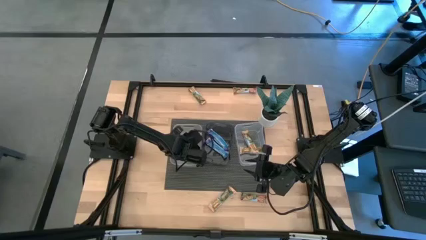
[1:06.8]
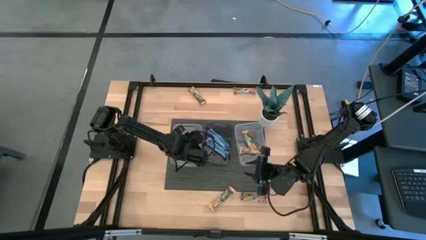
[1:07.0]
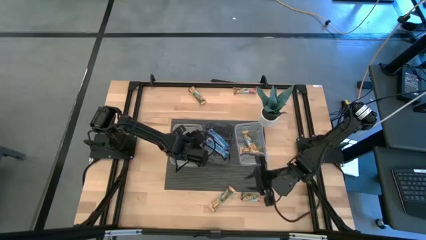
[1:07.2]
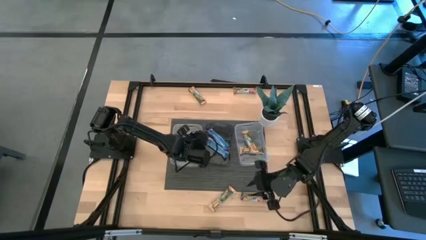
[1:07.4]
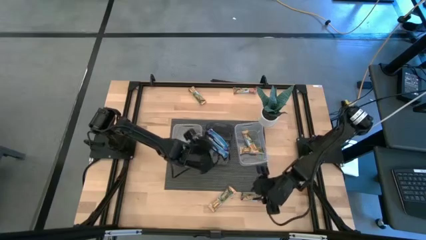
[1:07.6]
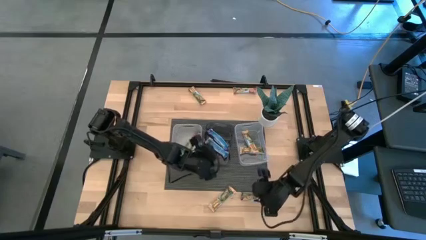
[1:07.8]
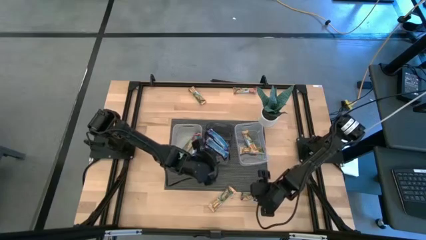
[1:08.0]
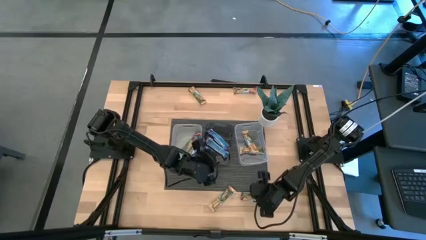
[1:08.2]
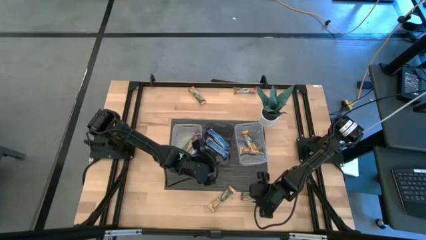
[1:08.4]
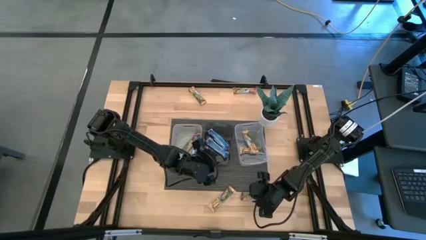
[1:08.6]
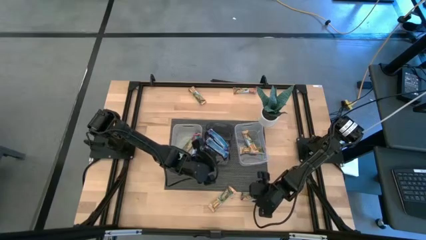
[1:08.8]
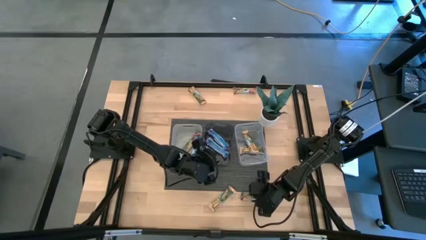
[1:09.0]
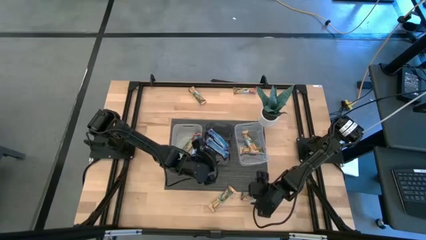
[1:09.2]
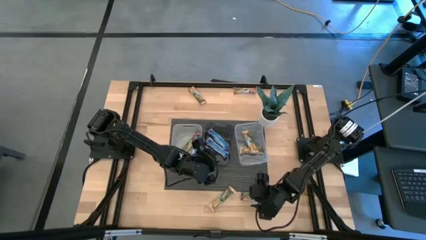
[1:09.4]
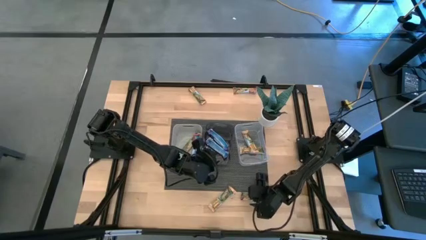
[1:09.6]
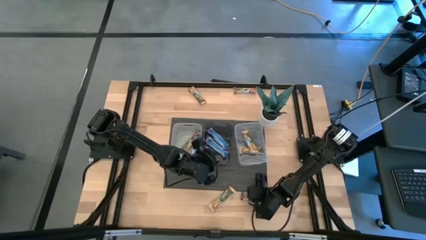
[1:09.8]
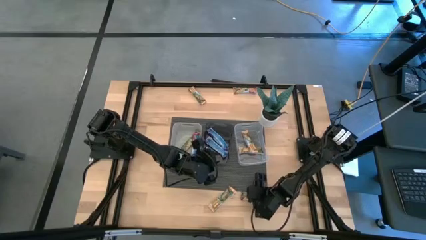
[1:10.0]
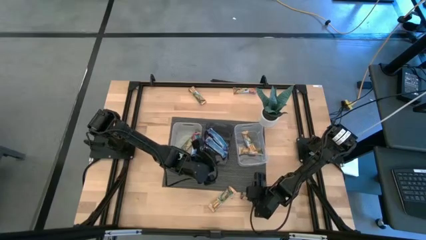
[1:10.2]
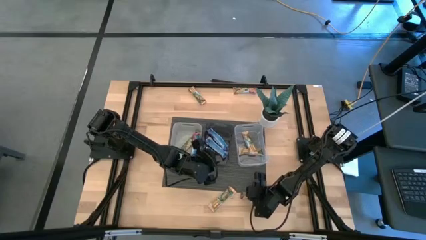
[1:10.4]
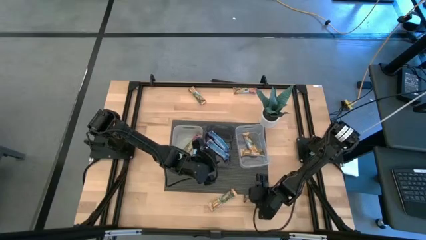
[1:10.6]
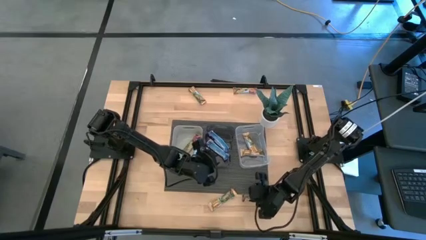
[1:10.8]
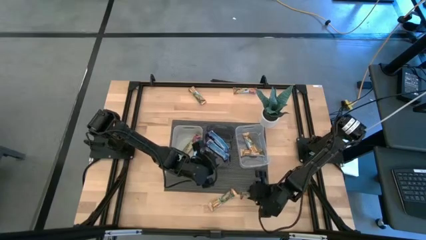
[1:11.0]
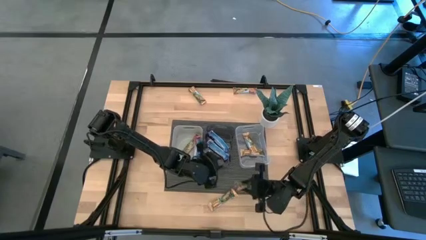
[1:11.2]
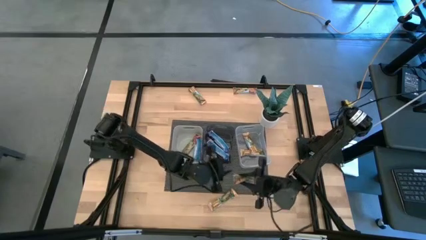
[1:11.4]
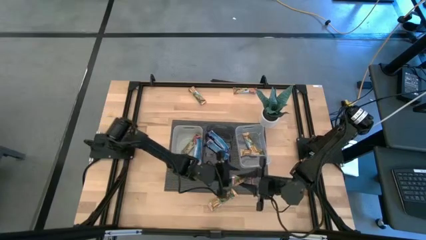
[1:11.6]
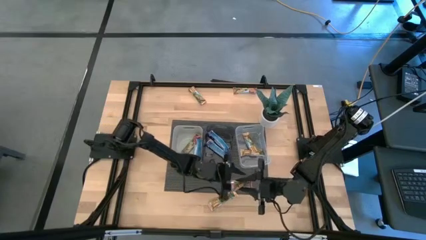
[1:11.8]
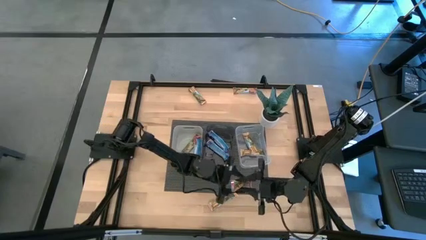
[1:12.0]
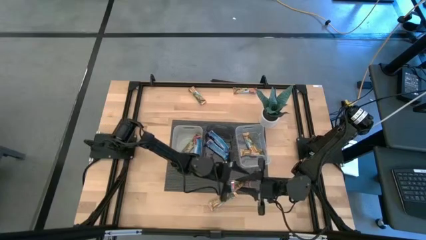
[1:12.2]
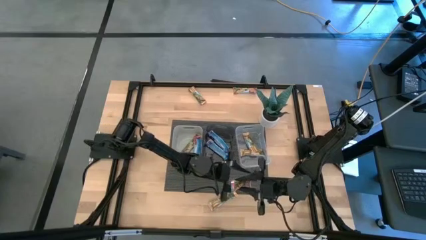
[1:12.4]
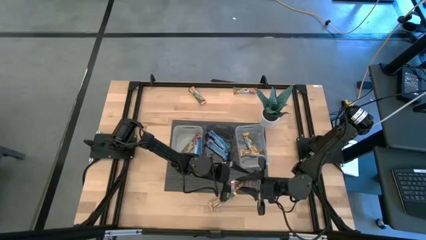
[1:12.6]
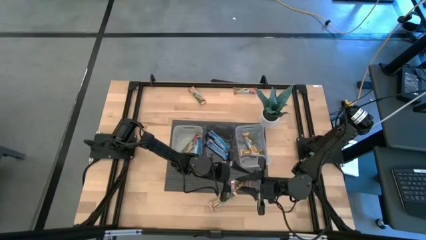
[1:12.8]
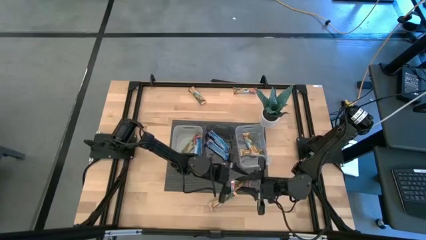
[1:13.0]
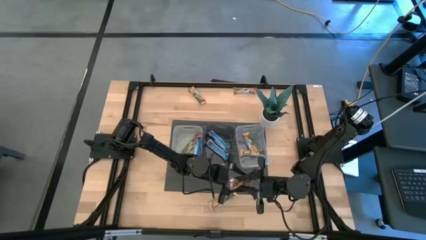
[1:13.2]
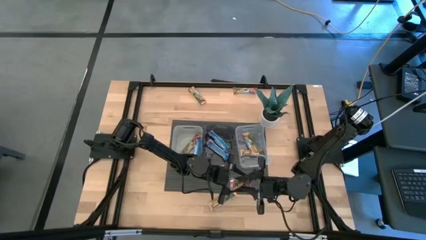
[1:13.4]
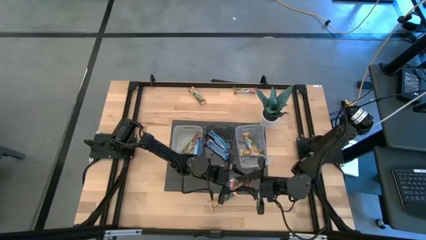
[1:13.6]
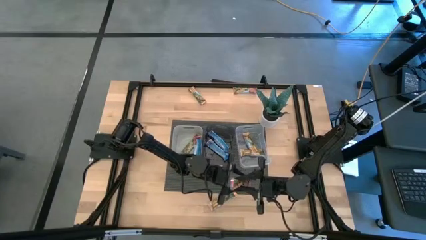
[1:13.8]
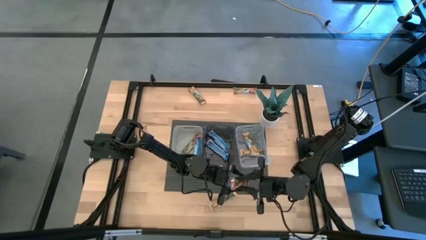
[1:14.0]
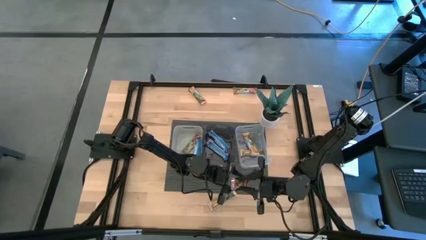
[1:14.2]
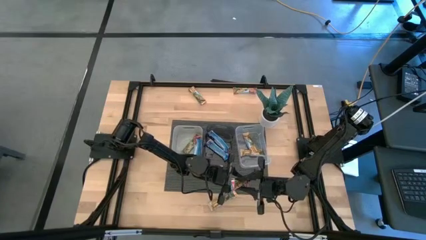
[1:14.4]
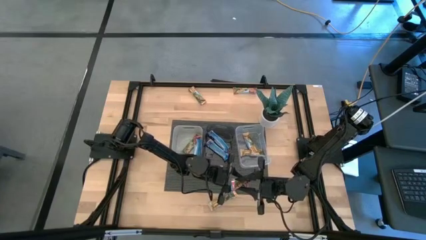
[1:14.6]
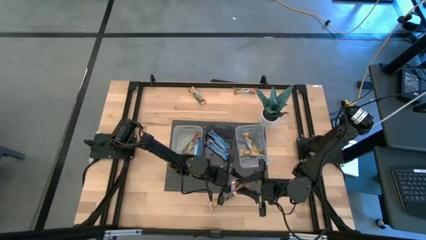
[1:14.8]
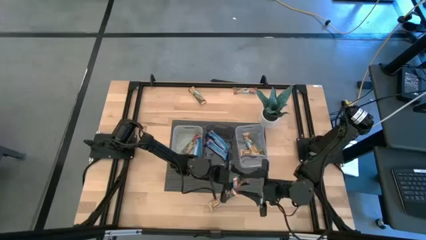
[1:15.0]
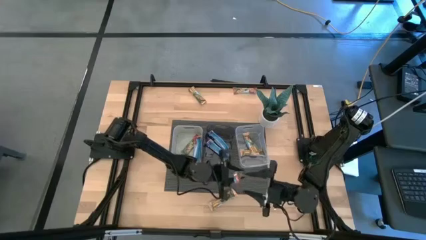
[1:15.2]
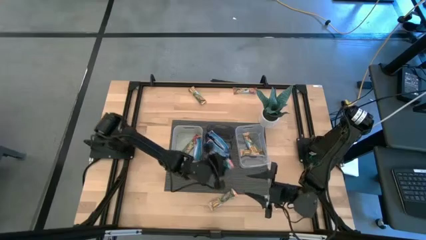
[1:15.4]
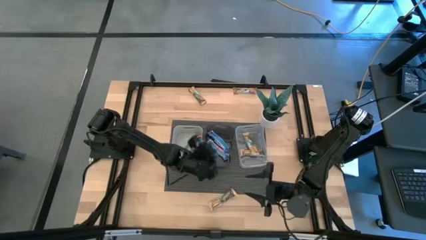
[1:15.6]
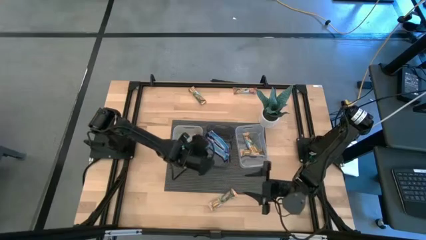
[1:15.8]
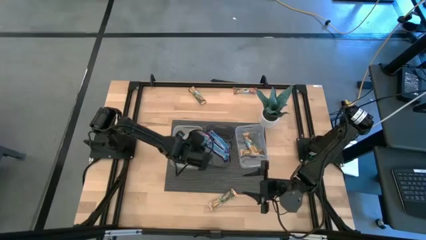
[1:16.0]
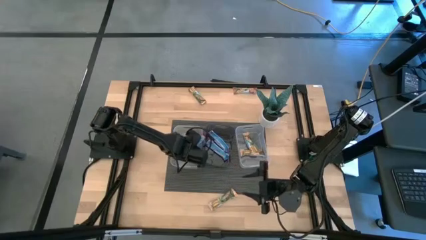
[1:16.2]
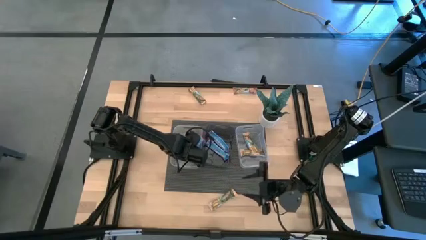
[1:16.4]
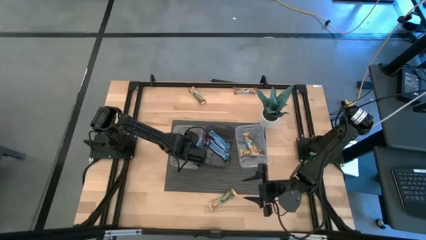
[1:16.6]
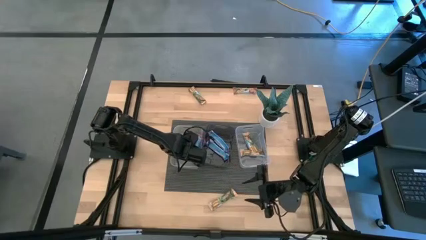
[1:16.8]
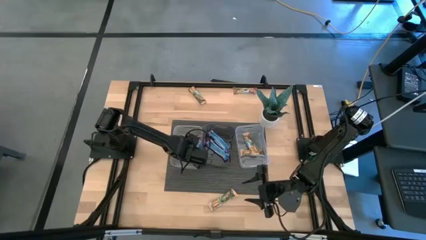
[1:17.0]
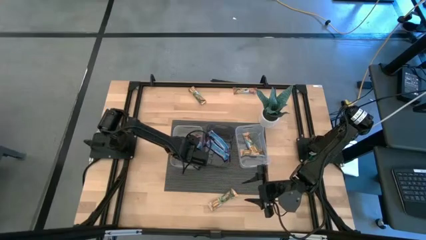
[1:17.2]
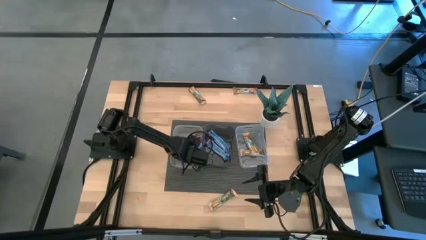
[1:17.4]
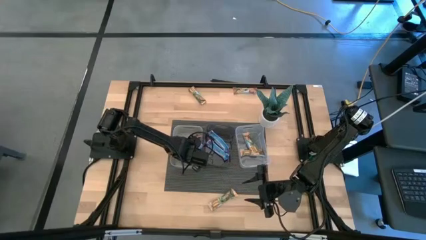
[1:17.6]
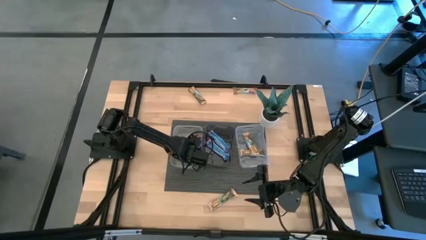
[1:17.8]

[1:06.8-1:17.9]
Task: Pick and place Granola Bars by type
Put the red granola bar into the gray bin

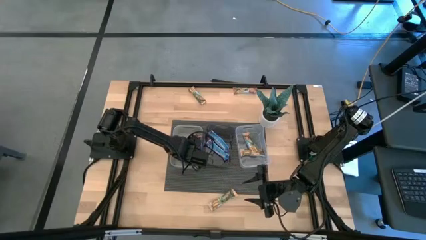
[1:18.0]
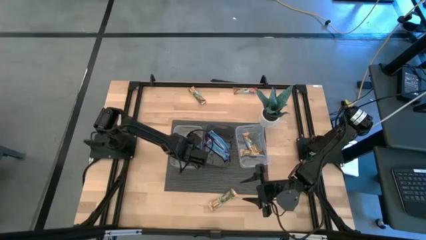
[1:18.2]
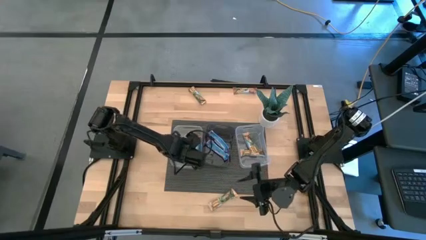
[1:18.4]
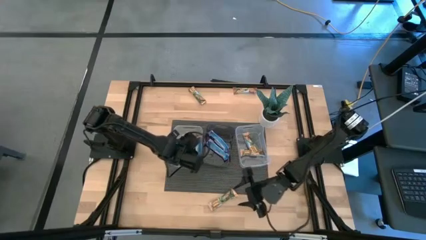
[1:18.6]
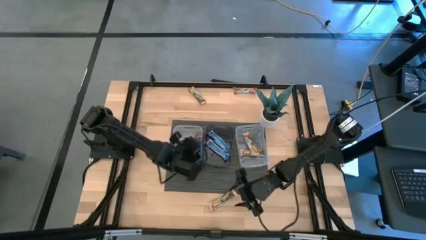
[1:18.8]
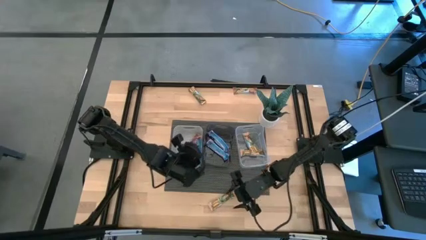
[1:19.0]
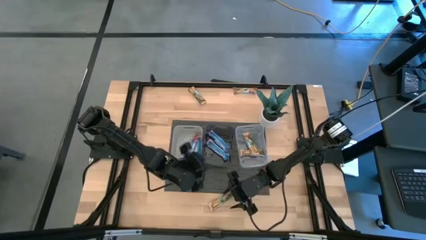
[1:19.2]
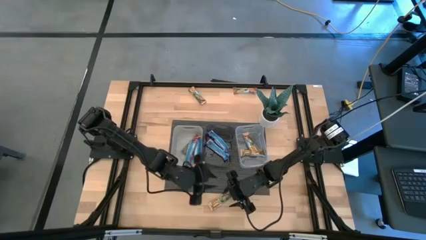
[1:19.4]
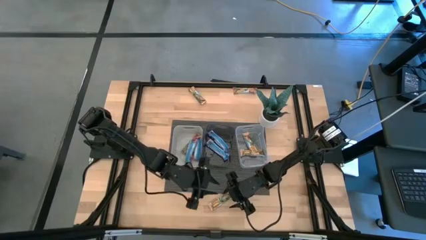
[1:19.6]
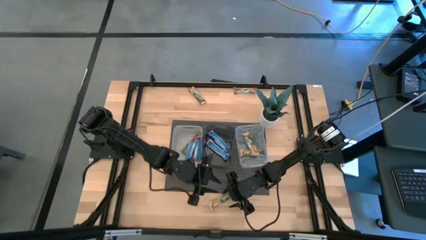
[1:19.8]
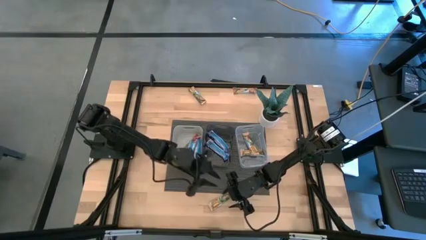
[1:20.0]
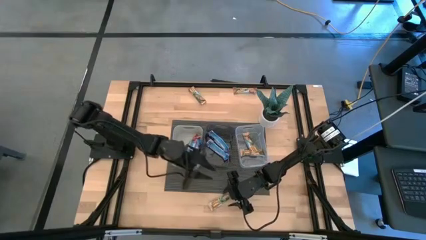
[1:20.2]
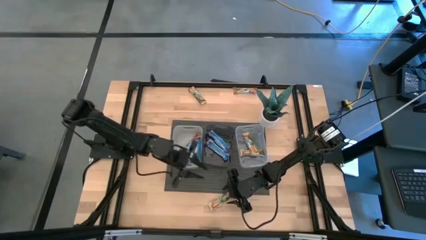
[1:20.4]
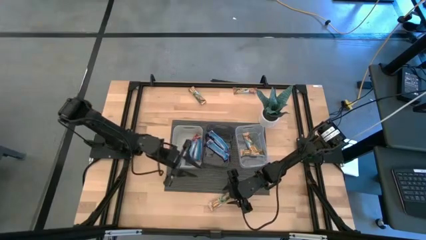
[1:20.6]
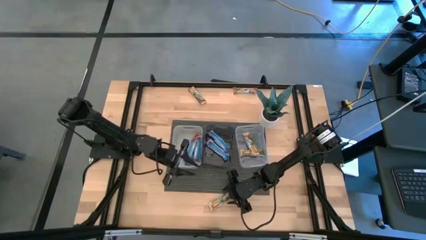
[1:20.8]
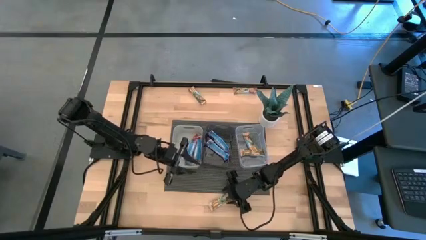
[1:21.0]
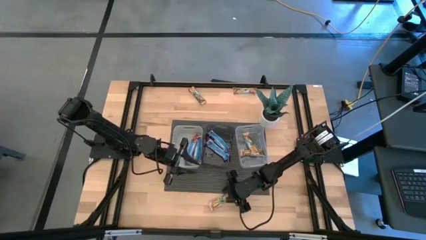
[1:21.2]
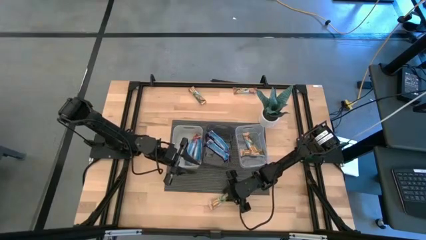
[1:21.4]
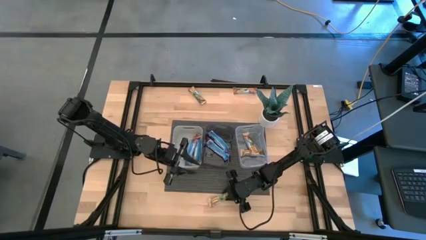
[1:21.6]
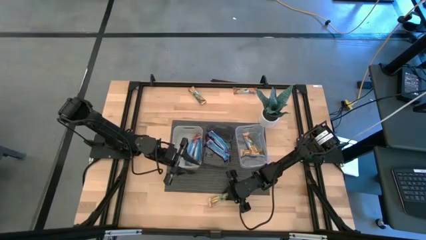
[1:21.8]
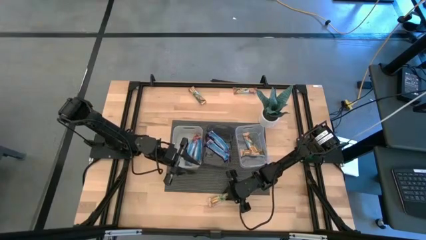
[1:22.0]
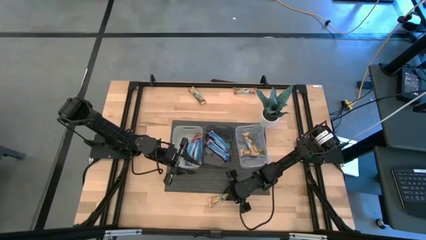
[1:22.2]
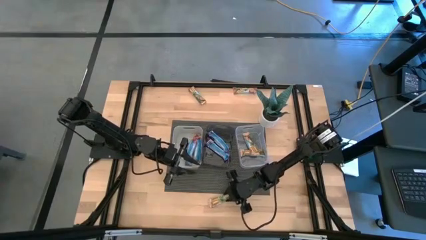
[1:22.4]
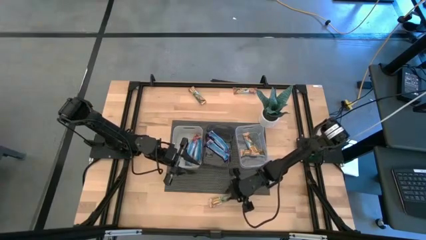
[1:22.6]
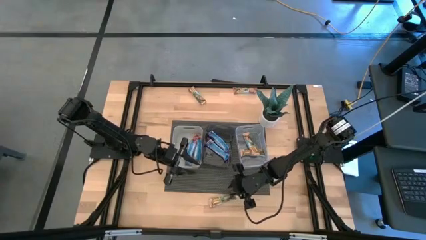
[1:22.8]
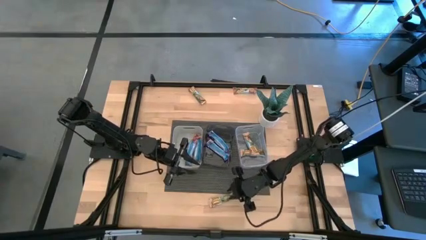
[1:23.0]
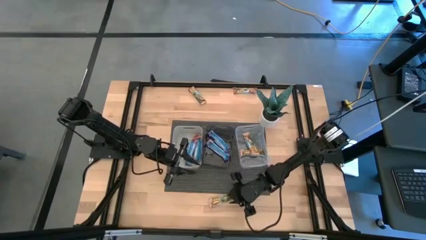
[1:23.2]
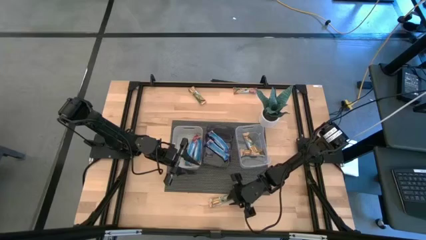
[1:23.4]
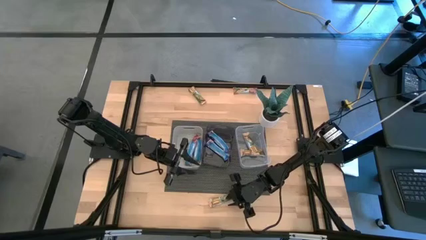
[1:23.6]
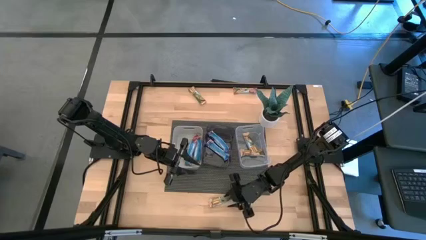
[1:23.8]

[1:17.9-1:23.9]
Put the orange granola bar into the transparent bin
